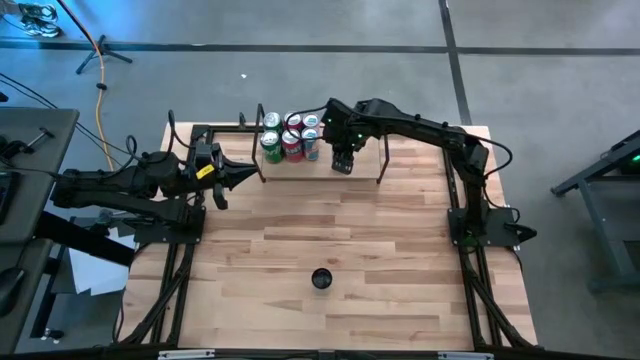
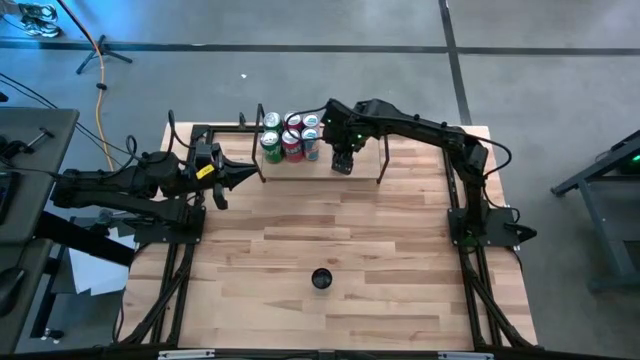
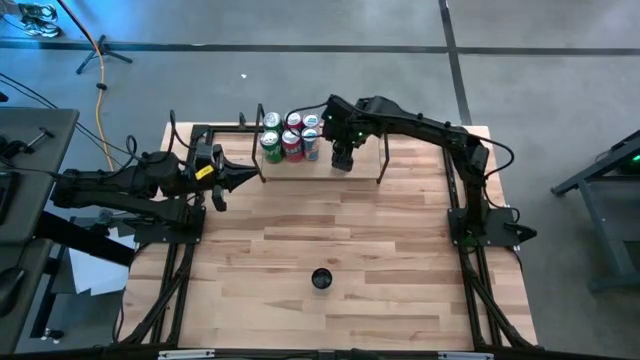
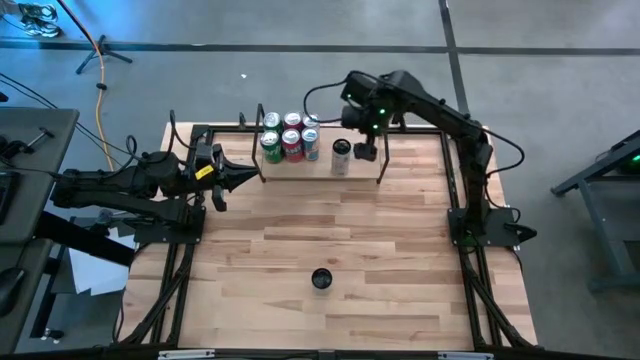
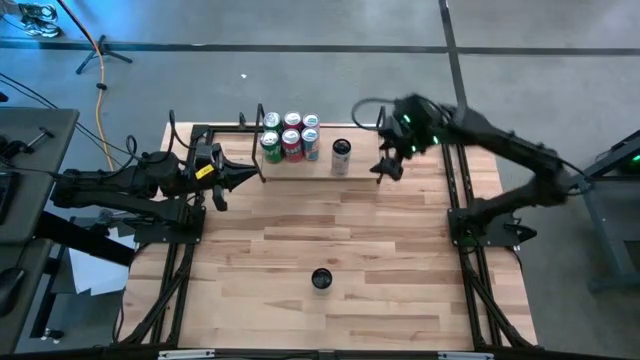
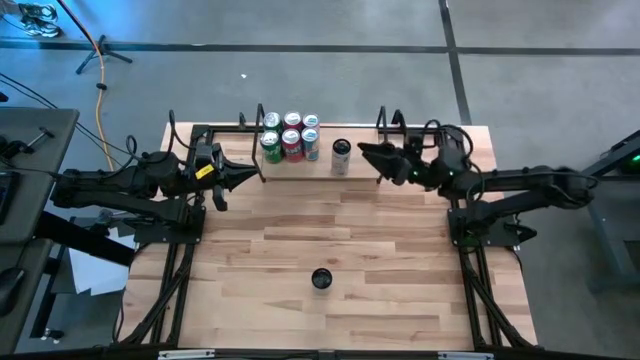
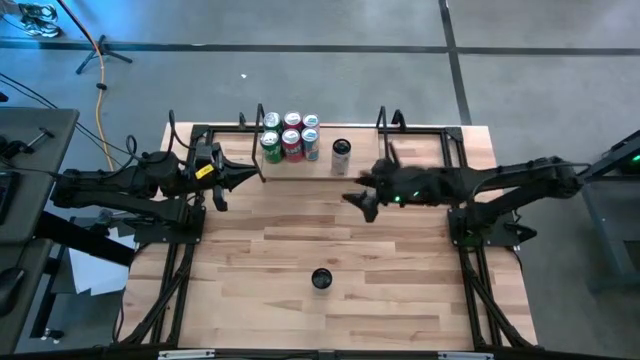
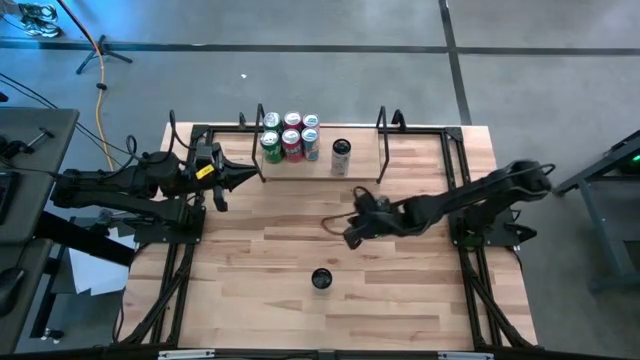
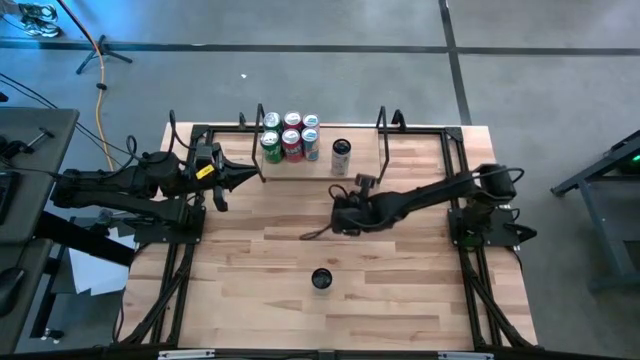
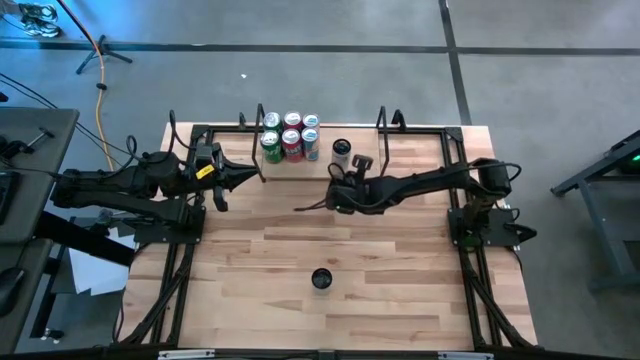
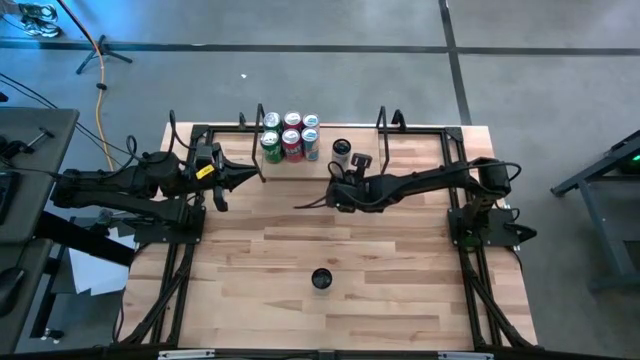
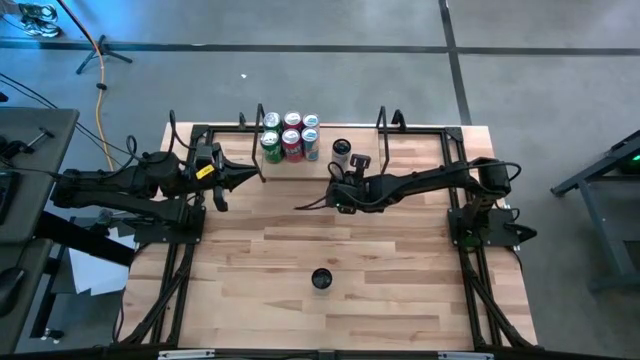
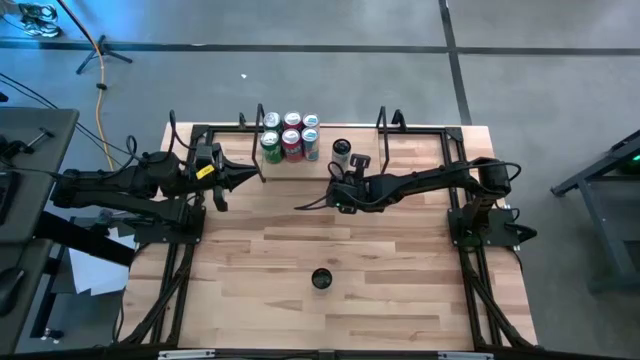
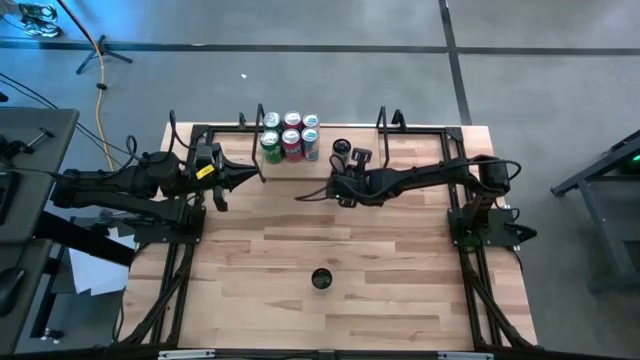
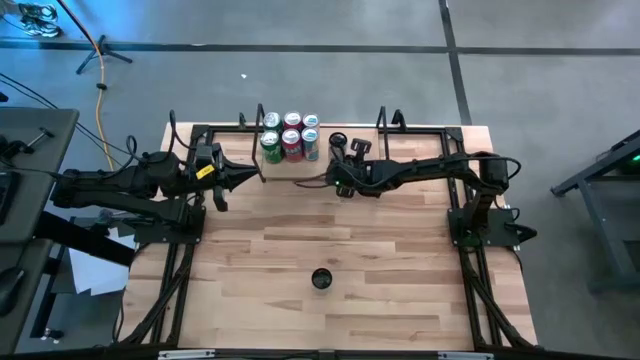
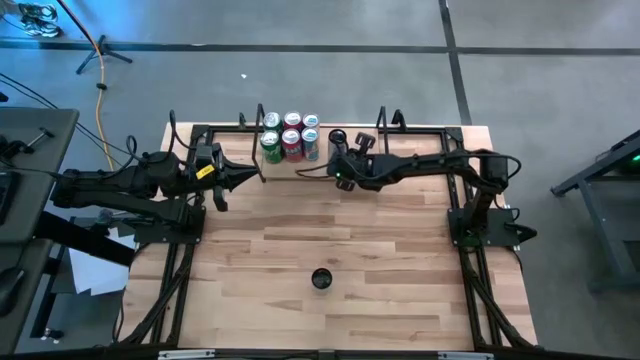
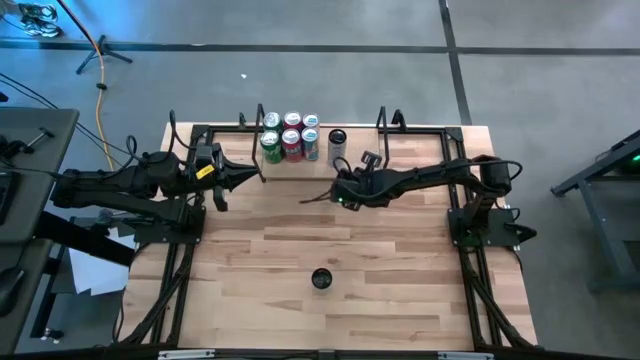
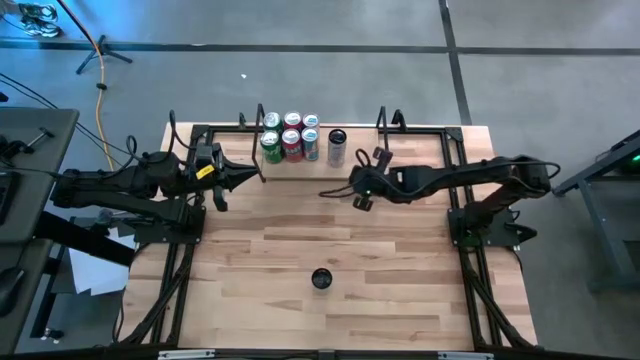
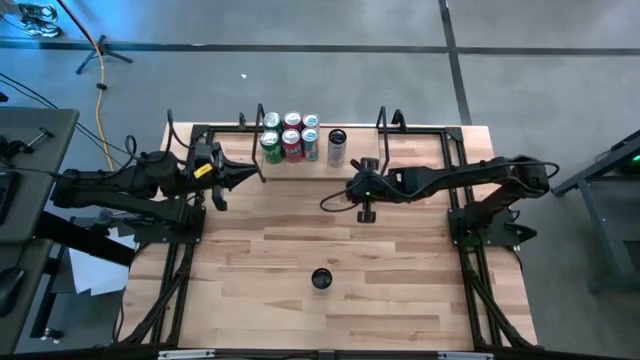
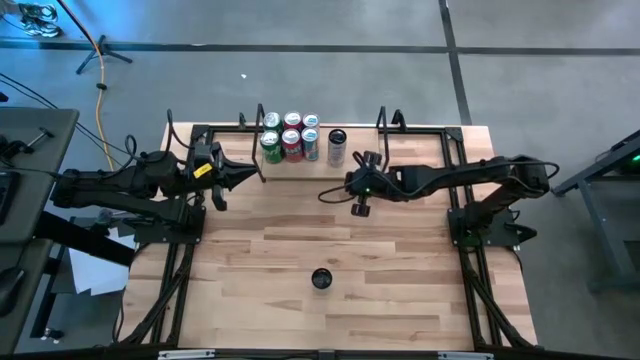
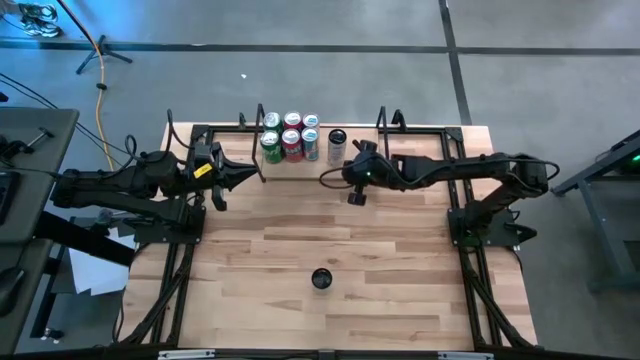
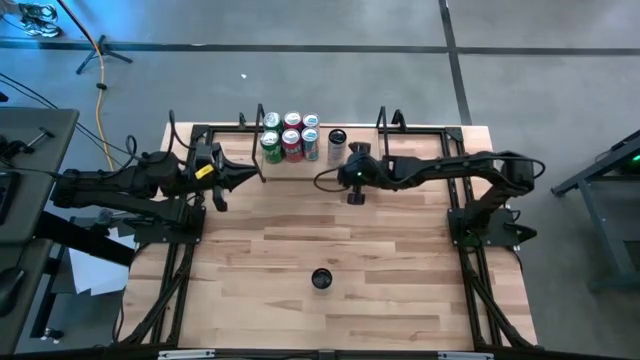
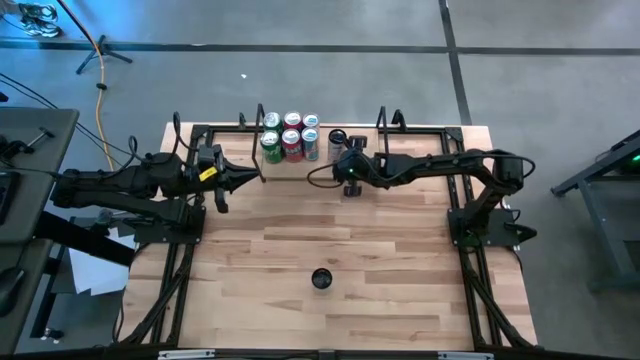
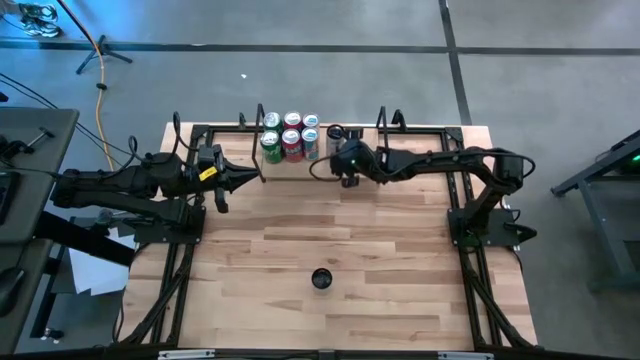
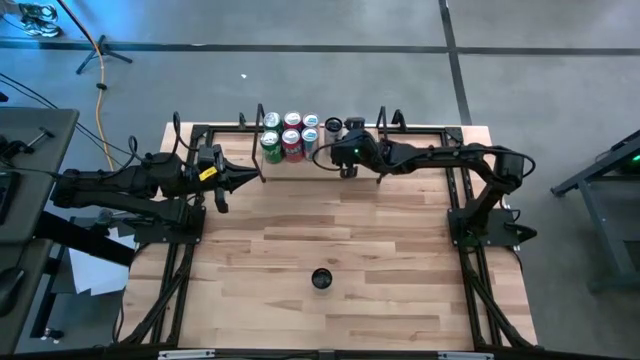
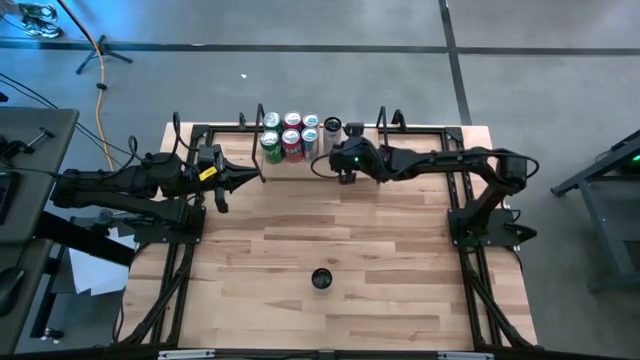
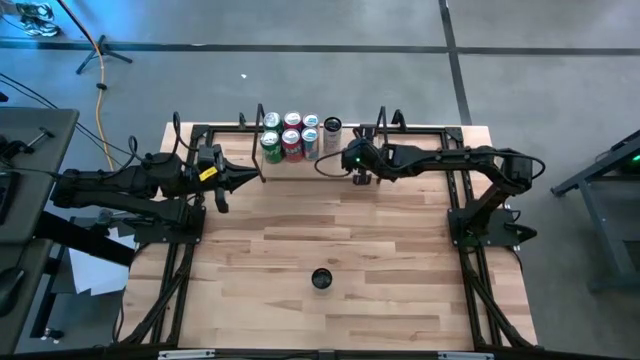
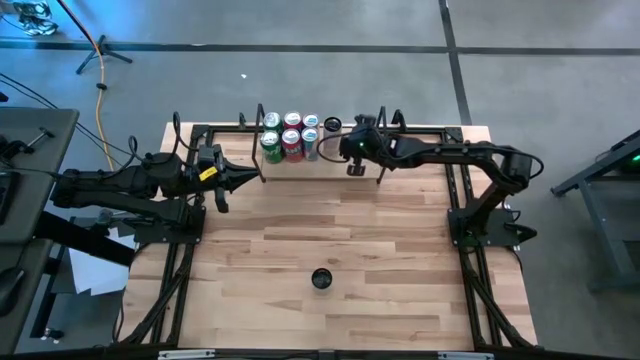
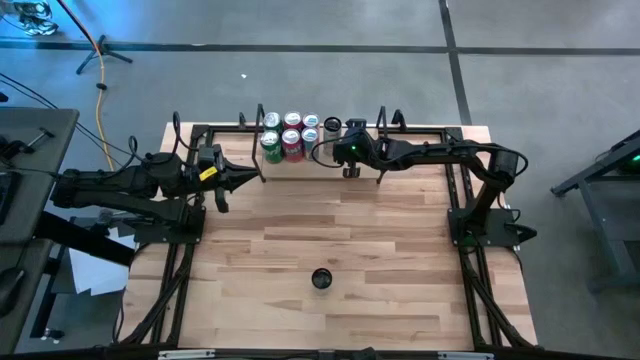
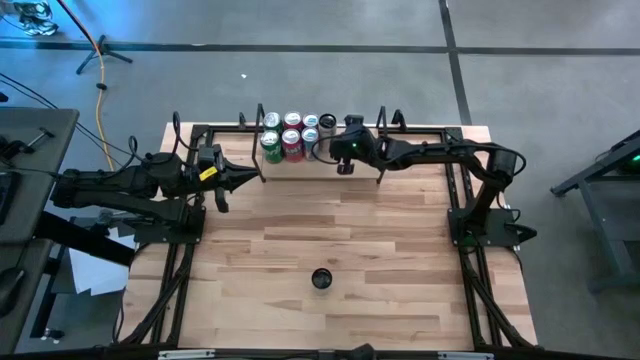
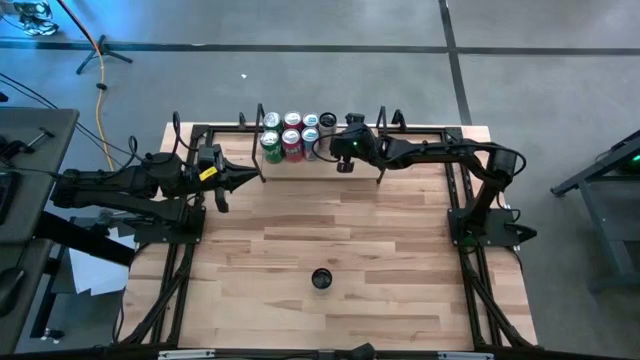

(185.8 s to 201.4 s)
Task: Place canned beverage on shelf
Put the top white pink soda can on the shelf

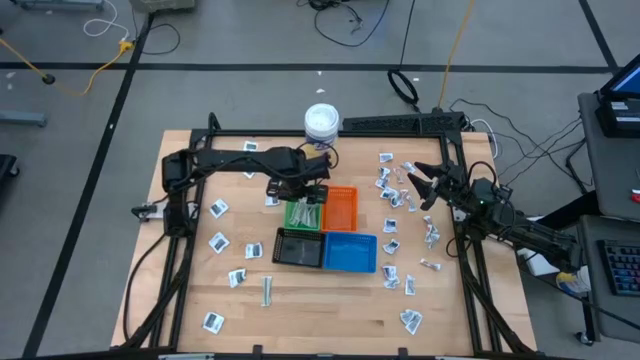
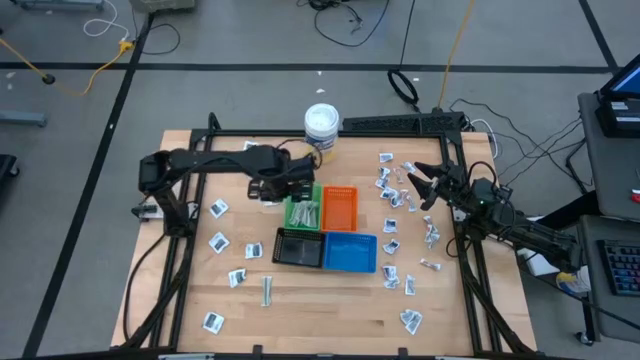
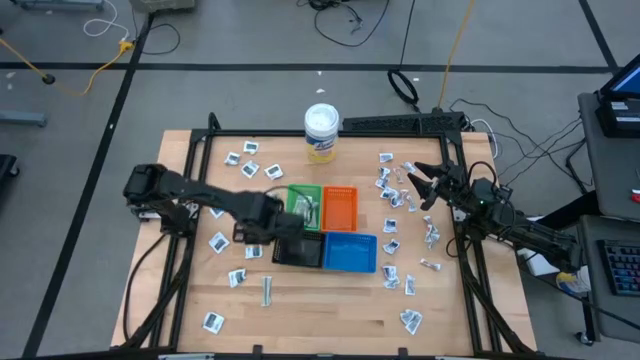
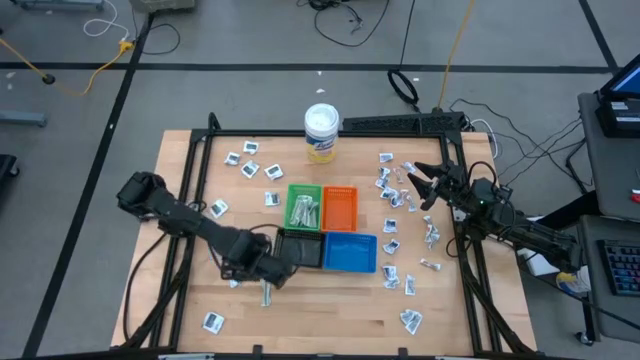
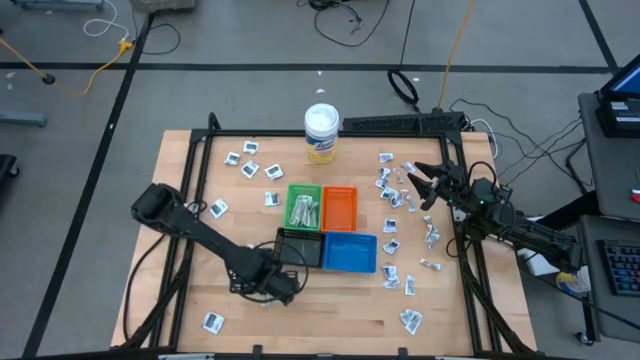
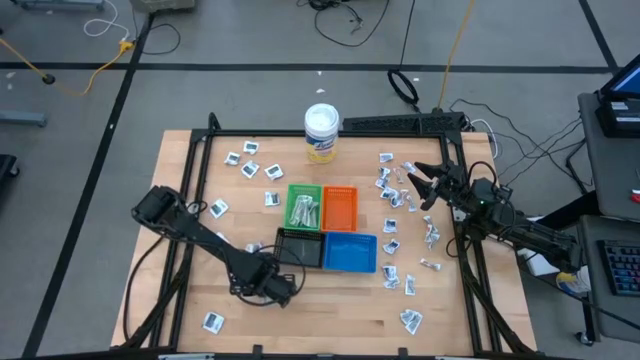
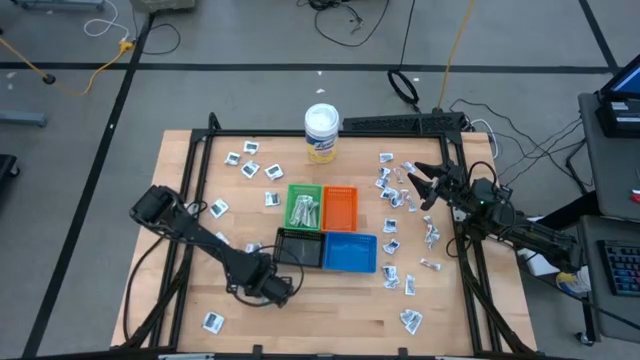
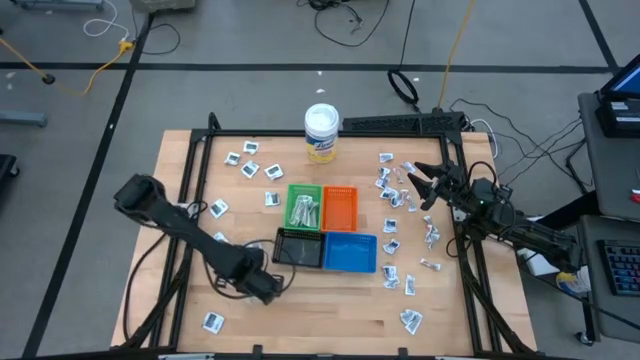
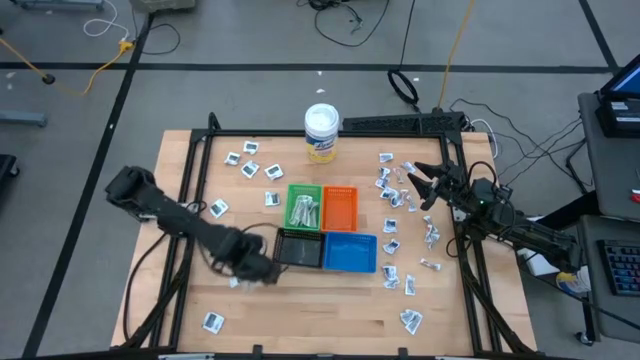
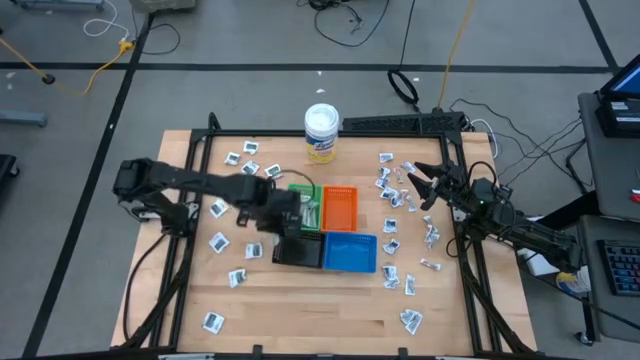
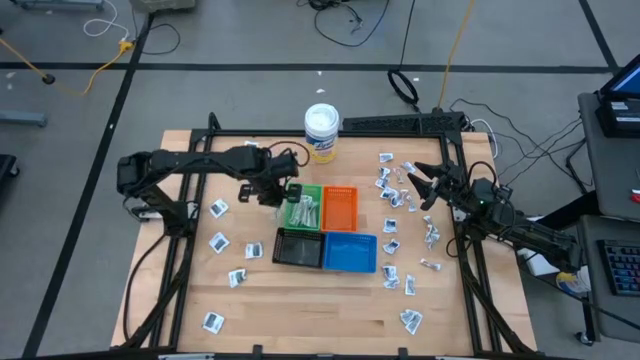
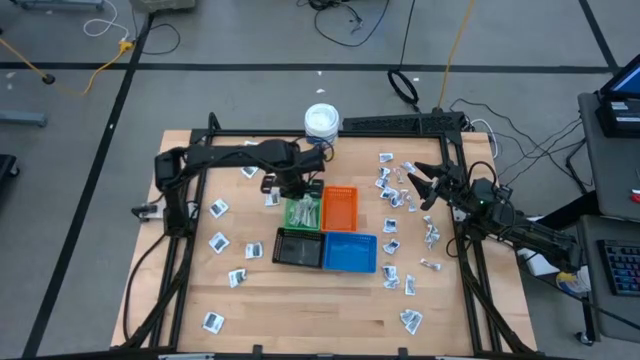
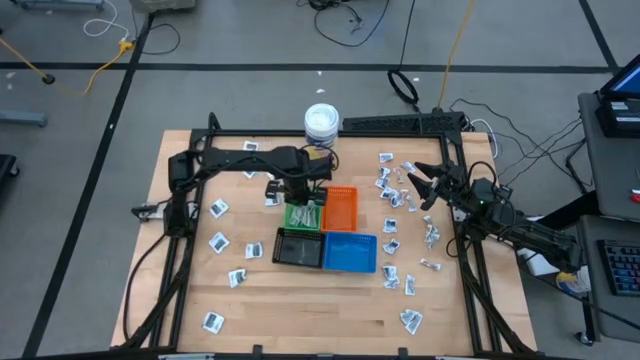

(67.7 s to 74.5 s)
Task: Pick & Place First Aid Supplies
Put the bandage pack into the green bin
